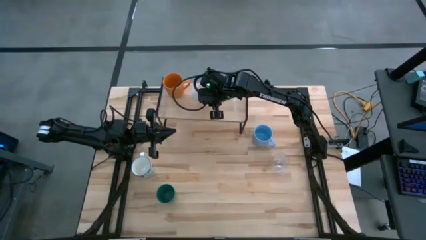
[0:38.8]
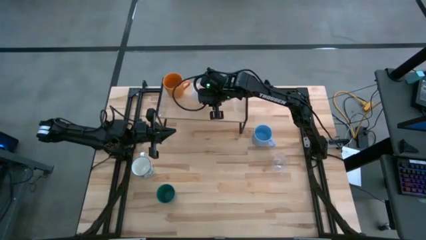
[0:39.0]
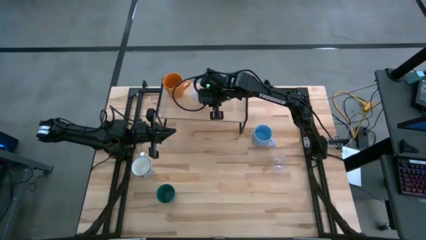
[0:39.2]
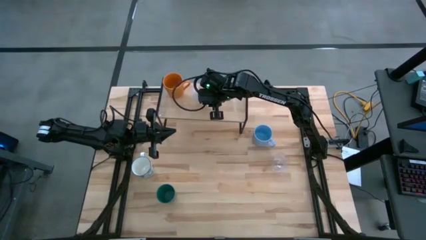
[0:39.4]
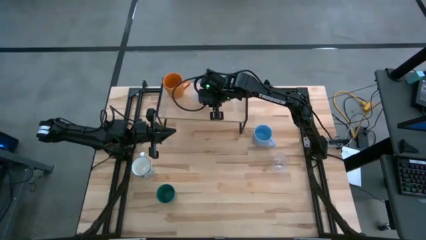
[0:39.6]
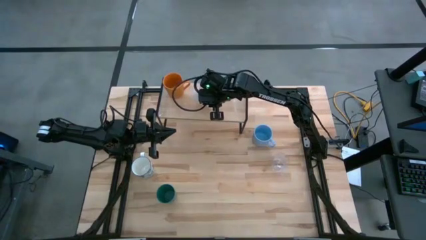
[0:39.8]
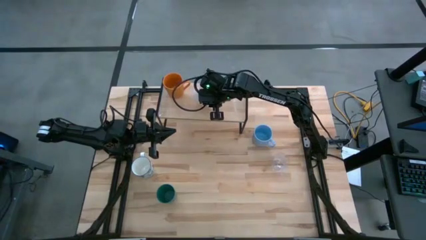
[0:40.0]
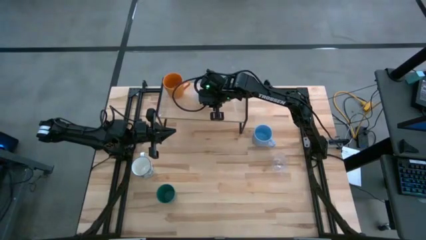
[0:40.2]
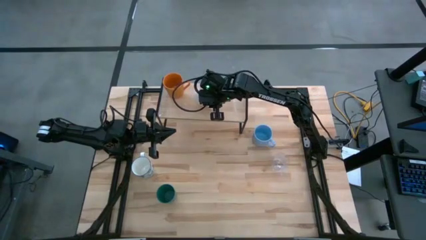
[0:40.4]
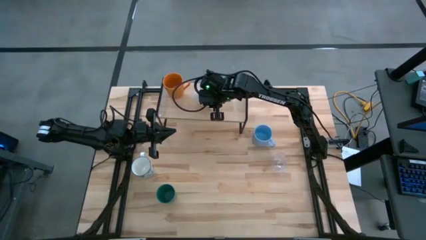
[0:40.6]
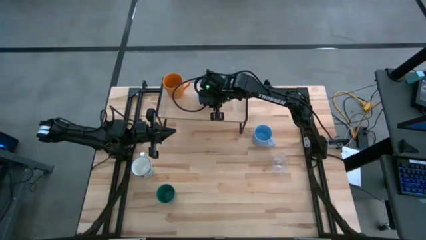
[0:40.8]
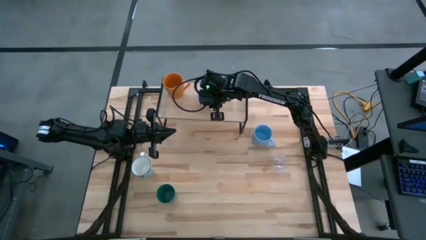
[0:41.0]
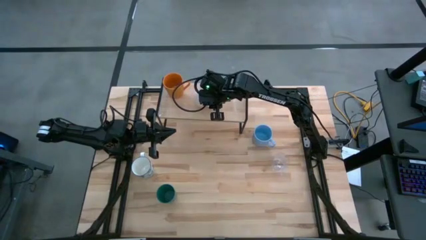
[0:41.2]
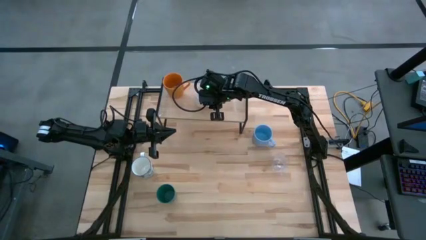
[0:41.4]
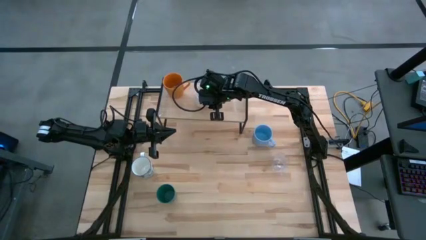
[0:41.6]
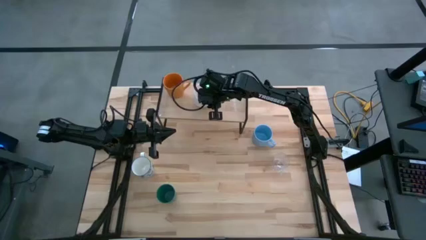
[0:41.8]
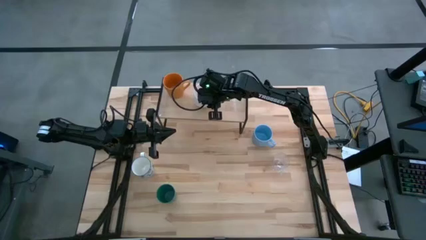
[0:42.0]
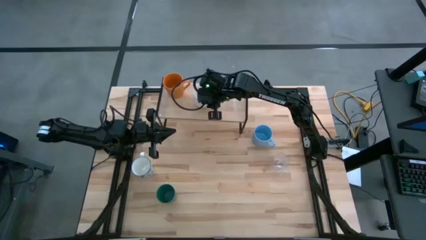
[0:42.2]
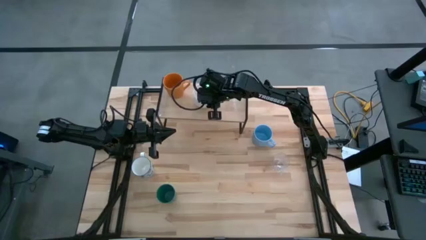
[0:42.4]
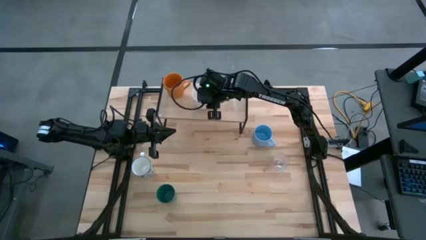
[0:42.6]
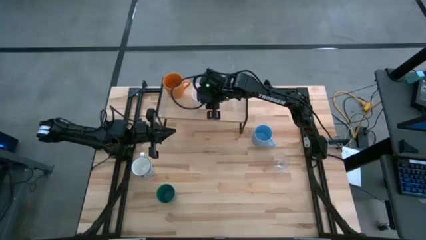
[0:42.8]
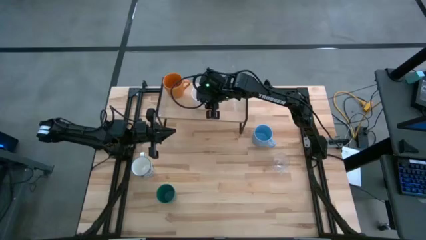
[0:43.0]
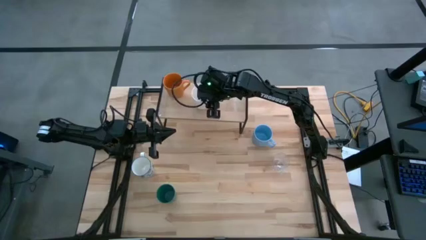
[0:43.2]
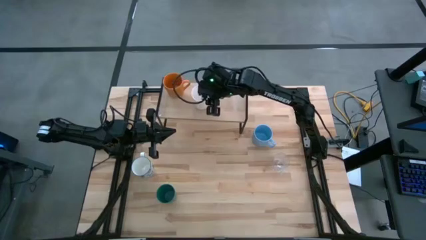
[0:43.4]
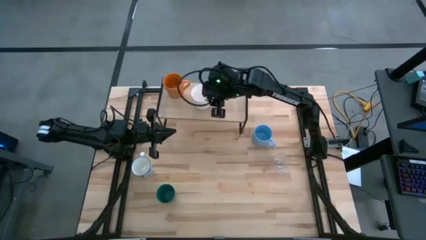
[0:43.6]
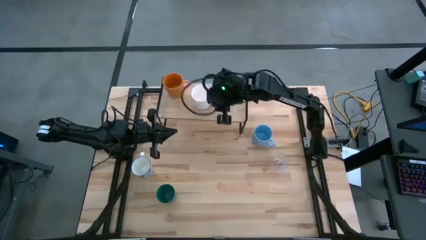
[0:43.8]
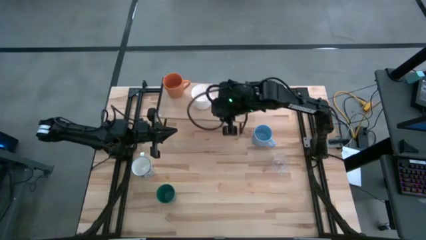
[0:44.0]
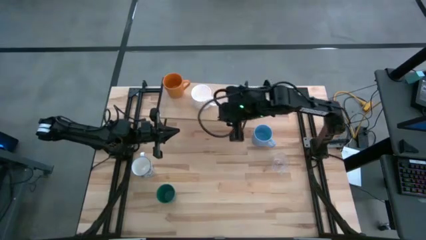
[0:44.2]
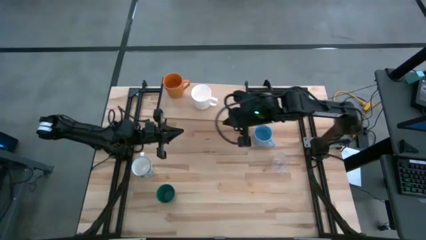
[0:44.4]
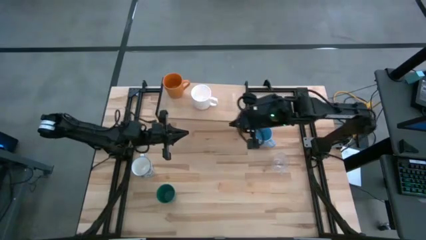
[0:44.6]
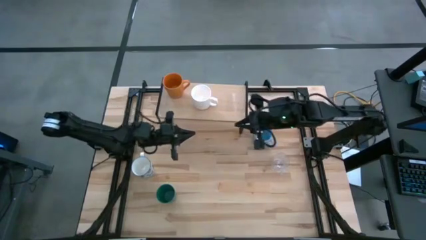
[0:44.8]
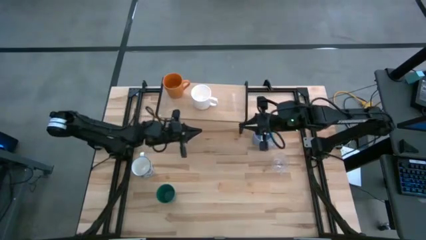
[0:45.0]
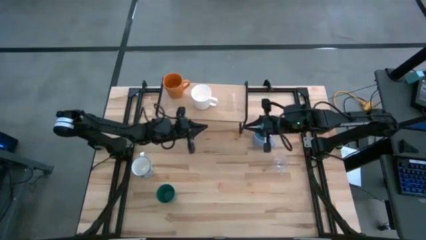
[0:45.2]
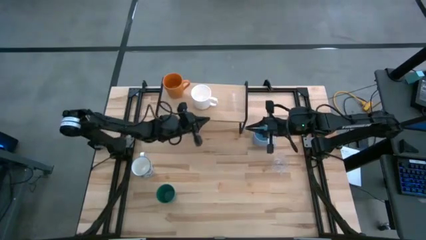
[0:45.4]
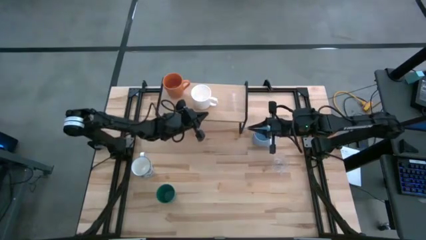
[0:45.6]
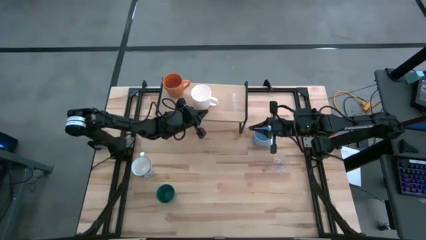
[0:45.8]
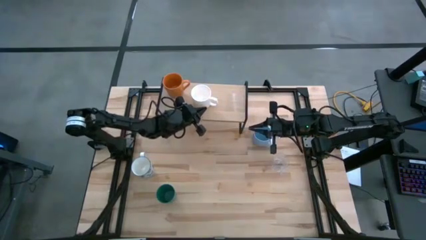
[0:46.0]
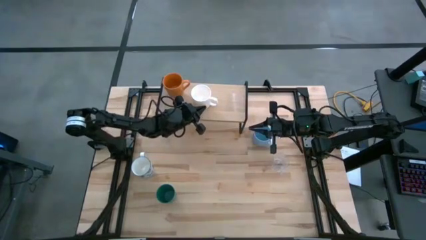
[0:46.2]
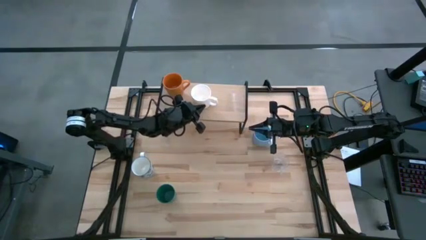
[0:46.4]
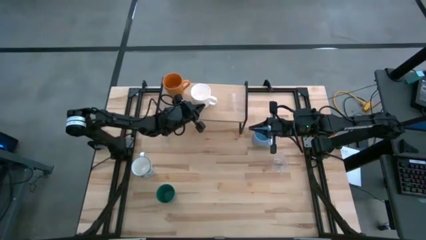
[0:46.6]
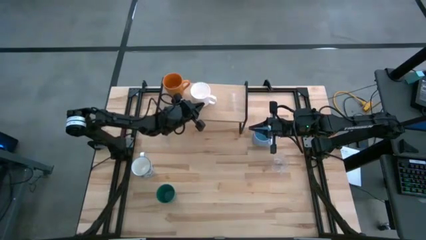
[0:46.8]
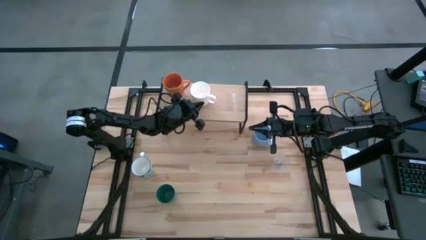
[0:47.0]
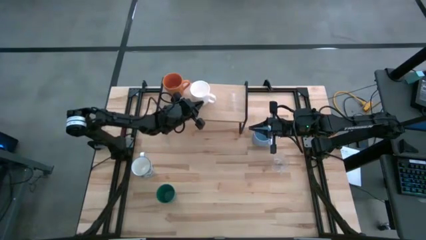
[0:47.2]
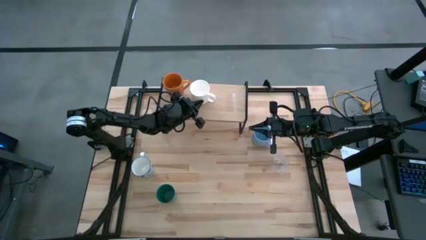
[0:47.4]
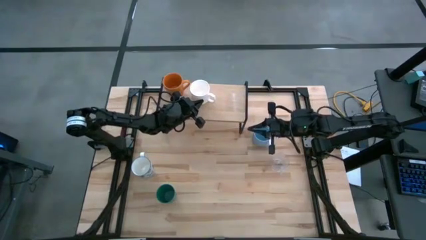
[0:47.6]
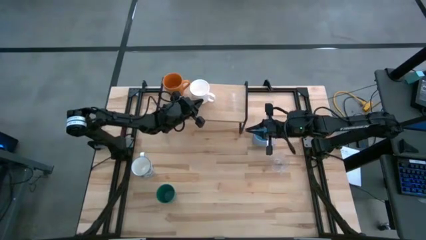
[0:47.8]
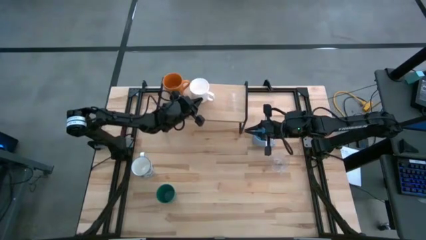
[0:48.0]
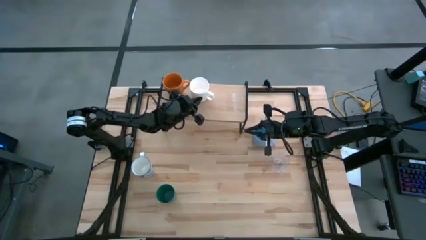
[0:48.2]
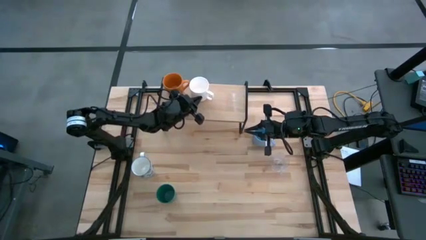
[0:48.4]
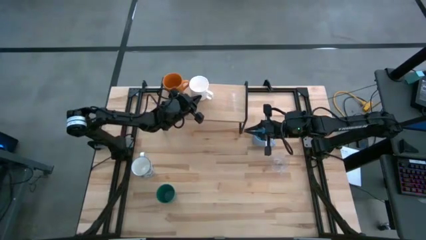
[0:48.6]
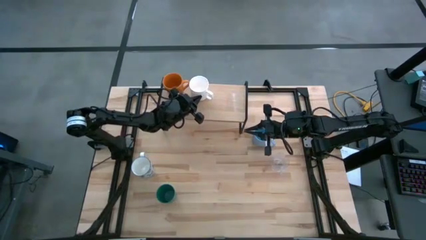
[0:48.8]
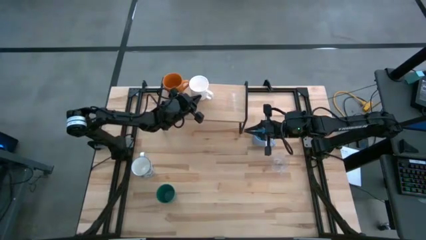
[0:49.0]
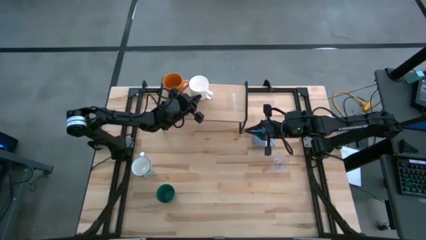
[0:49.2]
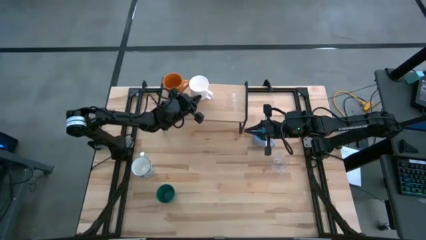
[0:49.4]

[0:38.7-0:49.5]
Task: Stack small to large cups/mugs on shelf
Put the white mug on the shelf
